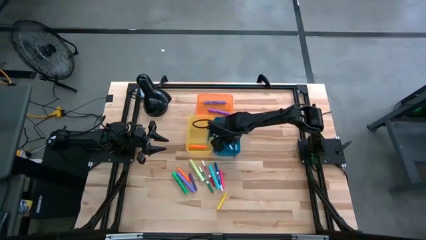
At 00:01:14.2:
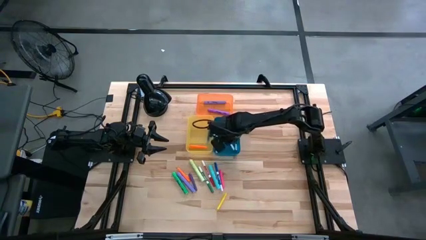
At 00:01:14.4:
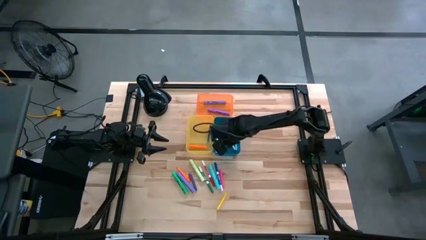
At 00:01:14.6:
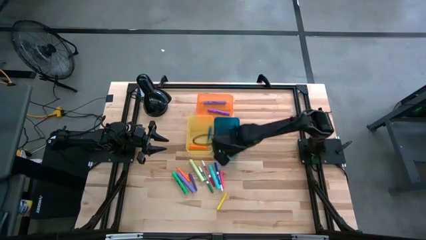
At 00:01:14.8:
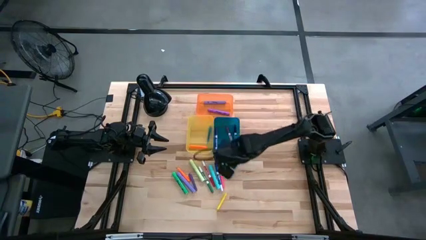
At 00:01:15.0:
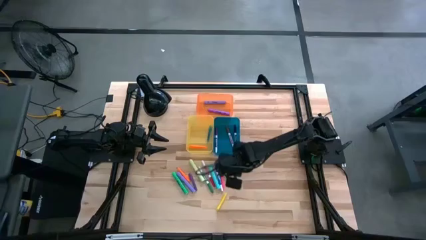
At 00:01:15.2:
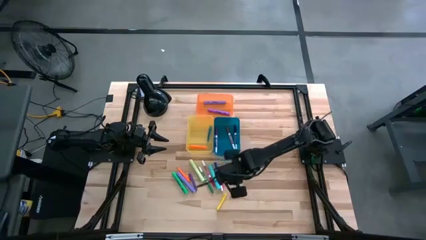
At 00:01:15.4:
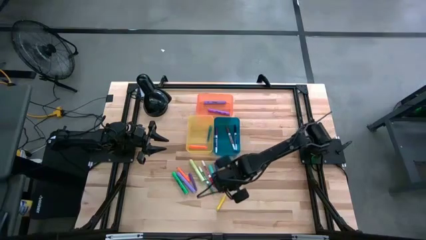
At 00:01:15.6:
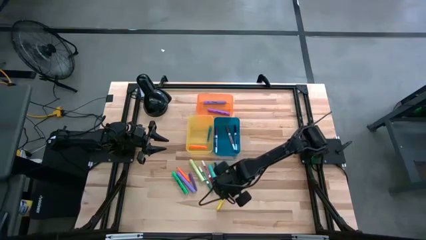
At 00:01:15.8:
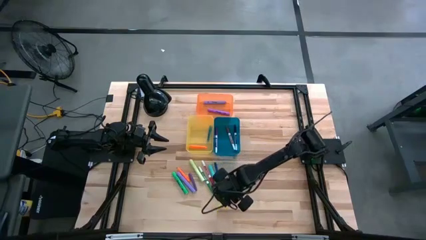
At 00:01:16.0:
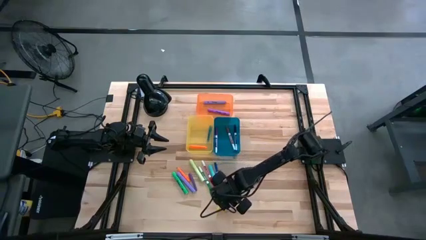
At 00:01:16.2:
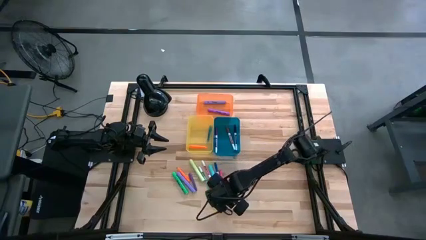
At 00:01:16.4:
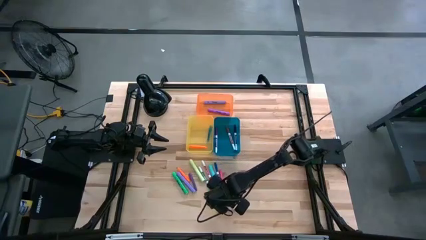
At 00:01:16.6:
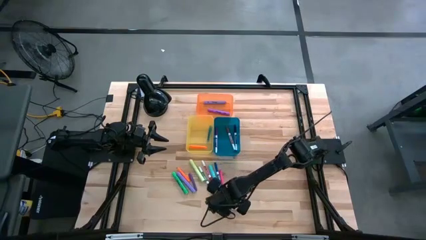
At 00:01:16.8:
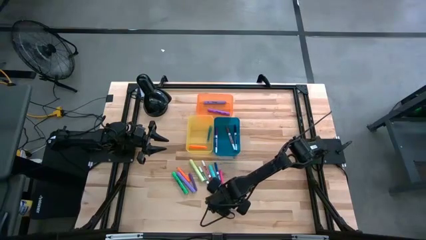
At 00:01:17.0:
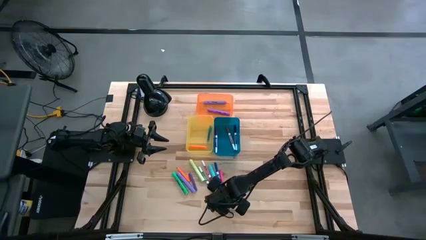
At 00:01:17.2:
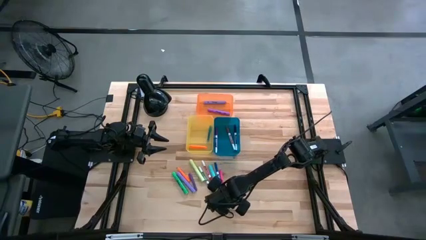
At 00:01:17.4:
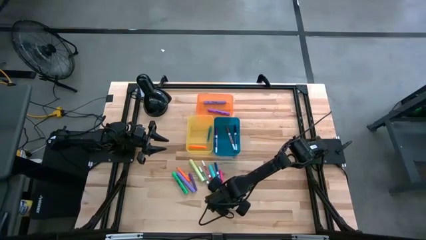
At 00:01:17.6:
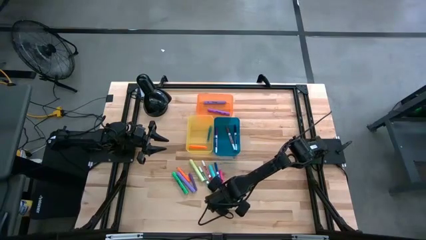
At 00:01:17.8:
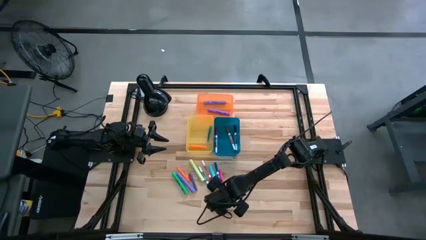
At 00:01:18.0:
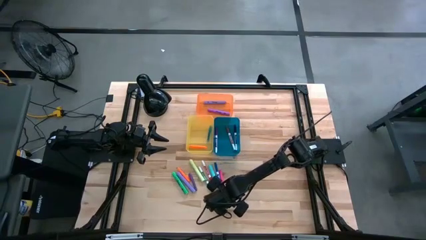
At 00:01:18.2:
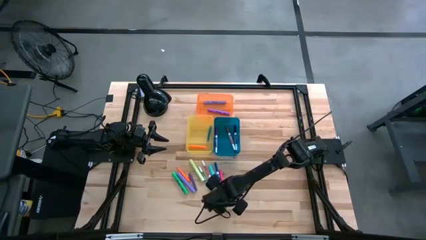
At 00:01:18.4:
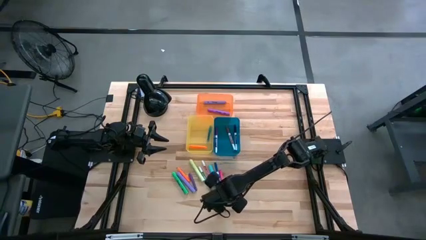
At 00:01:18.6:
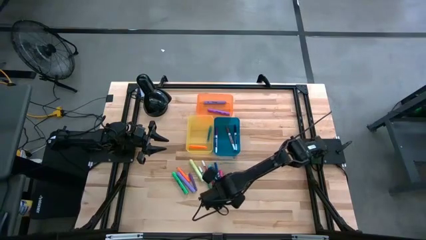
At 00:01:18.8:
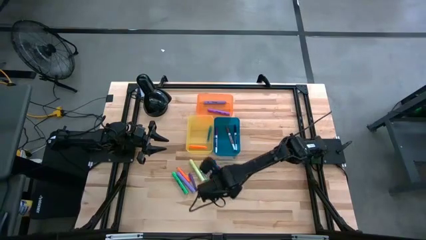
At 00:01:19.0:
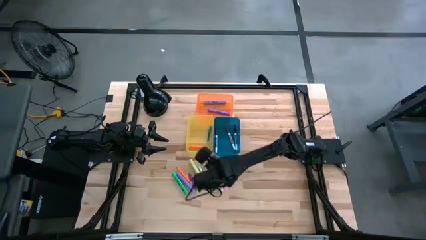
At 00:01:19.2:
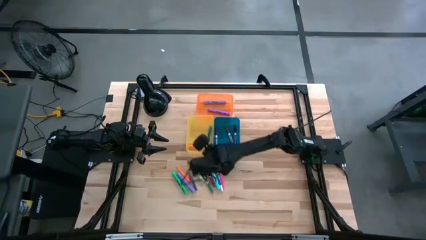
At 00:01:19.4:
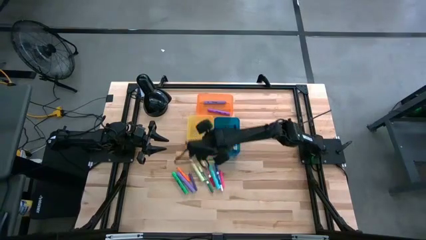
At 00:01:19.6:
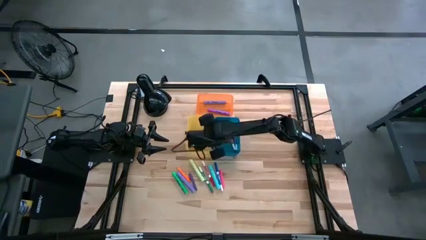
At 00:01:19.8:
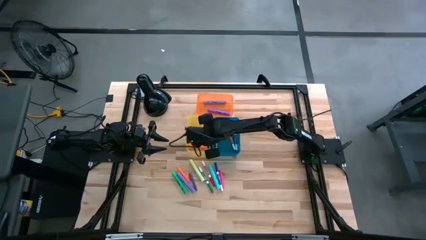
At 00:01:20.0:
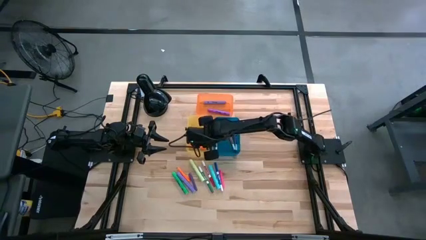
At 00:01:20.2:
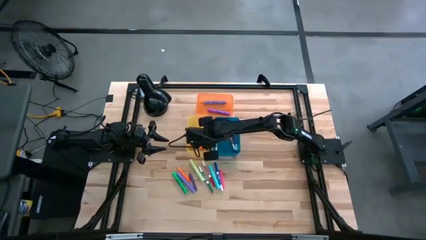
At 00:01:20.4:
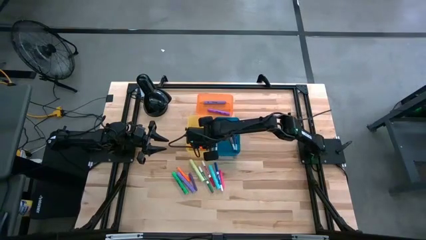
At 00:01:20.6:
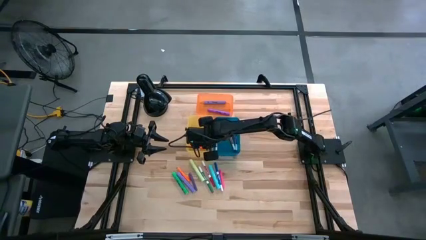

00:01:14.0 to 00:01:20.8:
Task: Pick & Place Markers
Put the yellow pen into the yellow bin

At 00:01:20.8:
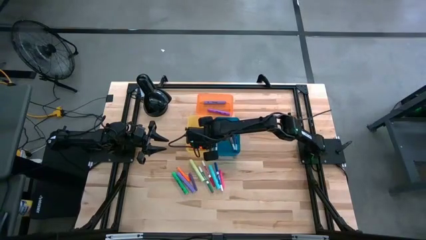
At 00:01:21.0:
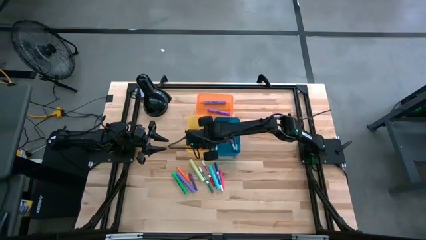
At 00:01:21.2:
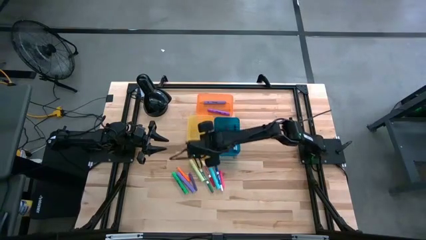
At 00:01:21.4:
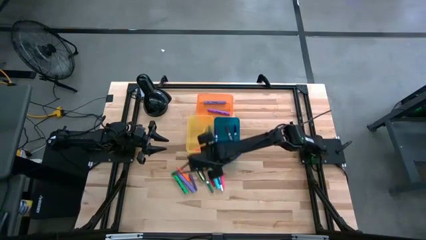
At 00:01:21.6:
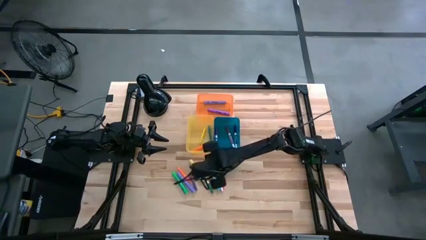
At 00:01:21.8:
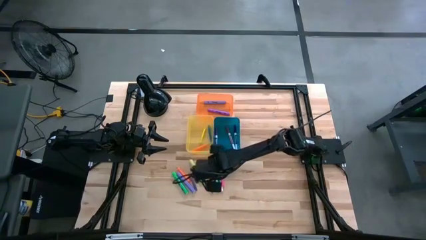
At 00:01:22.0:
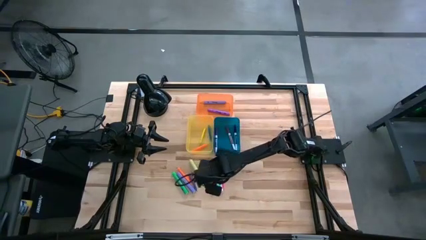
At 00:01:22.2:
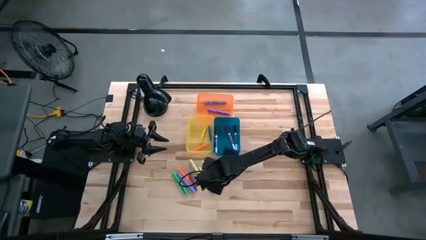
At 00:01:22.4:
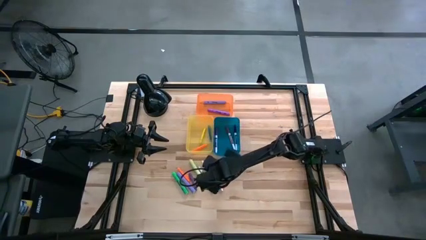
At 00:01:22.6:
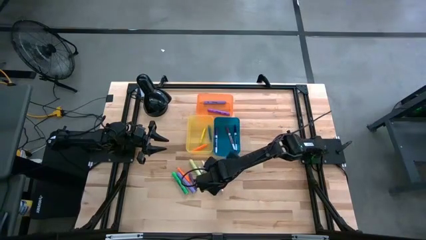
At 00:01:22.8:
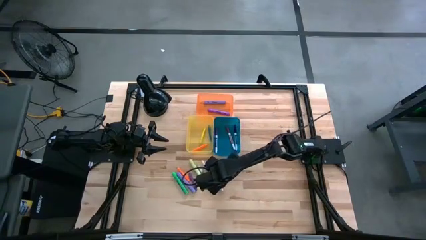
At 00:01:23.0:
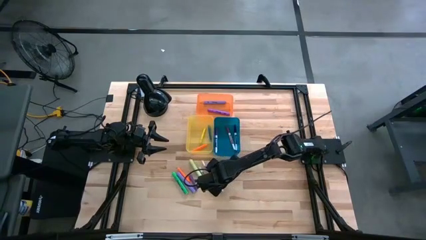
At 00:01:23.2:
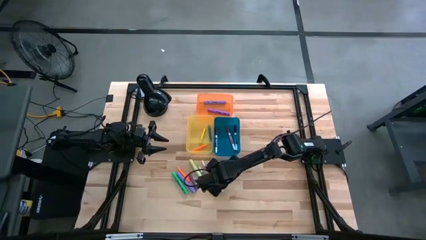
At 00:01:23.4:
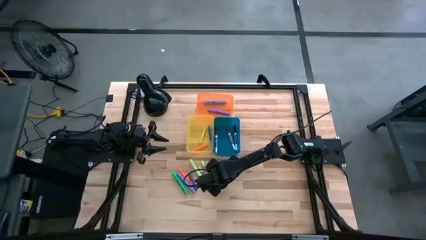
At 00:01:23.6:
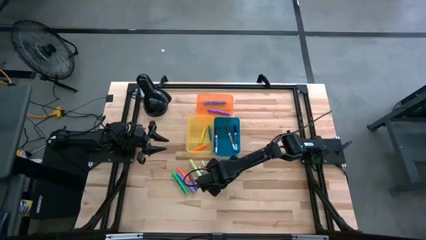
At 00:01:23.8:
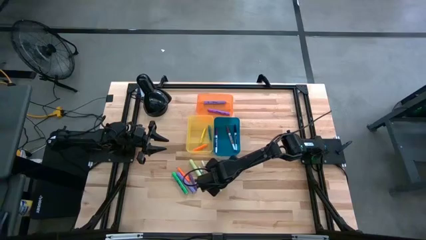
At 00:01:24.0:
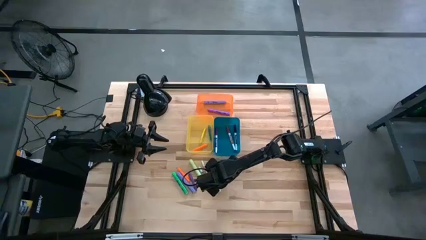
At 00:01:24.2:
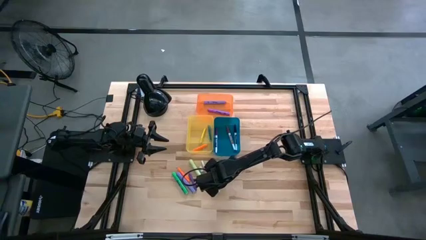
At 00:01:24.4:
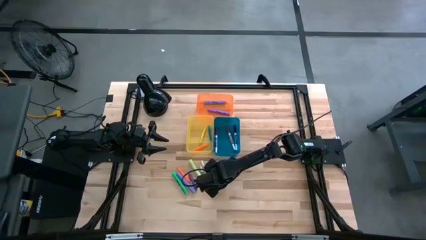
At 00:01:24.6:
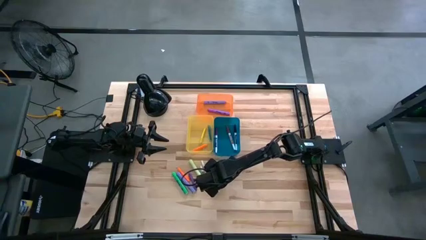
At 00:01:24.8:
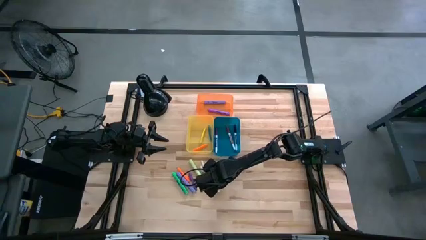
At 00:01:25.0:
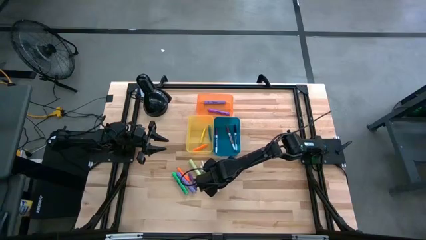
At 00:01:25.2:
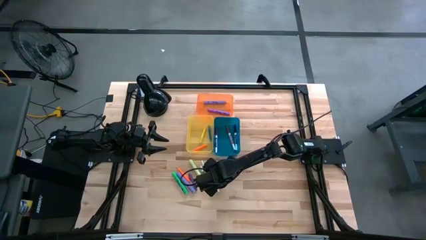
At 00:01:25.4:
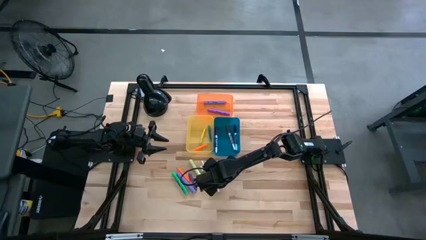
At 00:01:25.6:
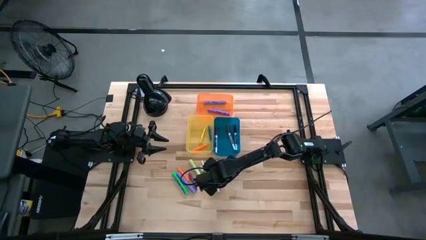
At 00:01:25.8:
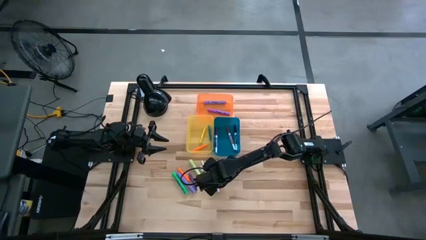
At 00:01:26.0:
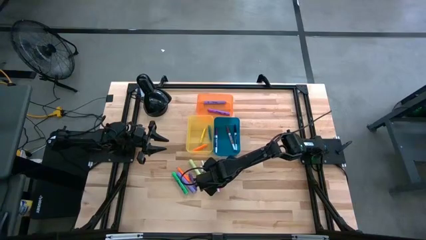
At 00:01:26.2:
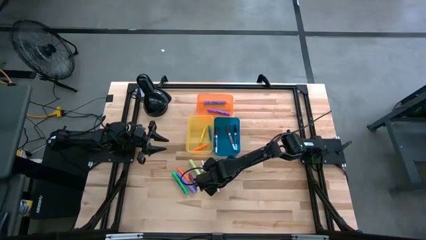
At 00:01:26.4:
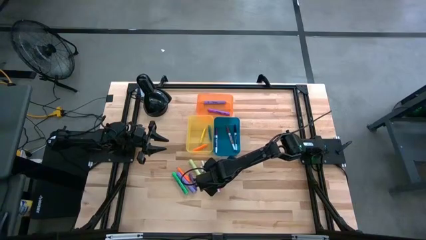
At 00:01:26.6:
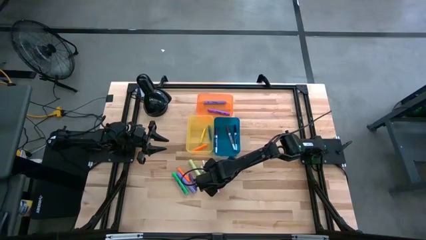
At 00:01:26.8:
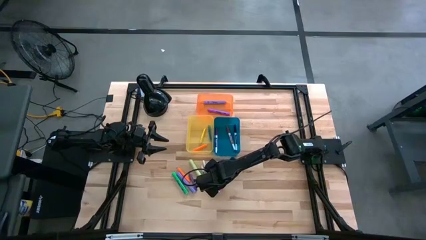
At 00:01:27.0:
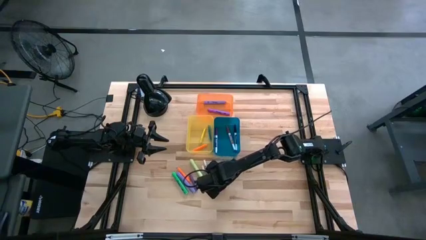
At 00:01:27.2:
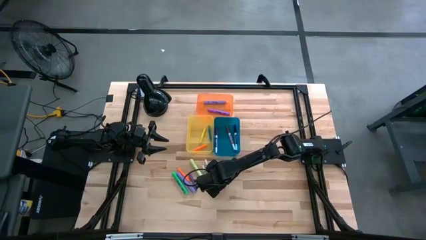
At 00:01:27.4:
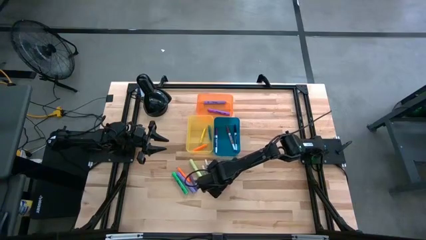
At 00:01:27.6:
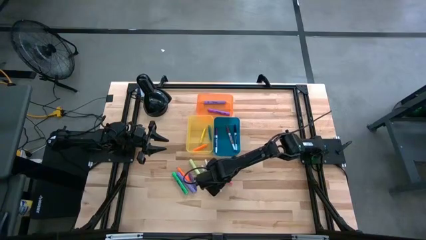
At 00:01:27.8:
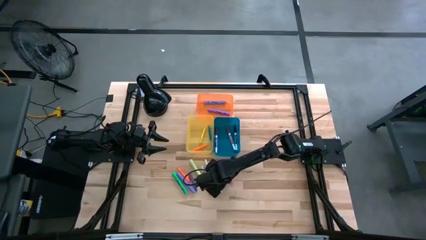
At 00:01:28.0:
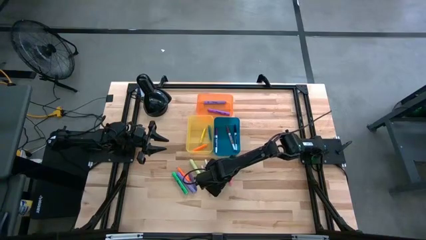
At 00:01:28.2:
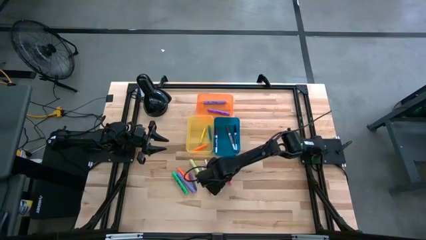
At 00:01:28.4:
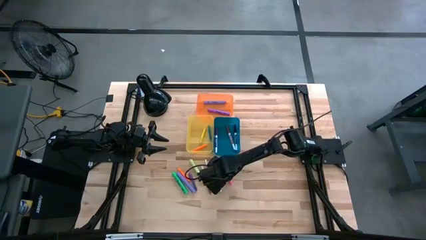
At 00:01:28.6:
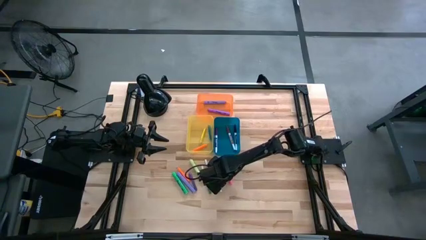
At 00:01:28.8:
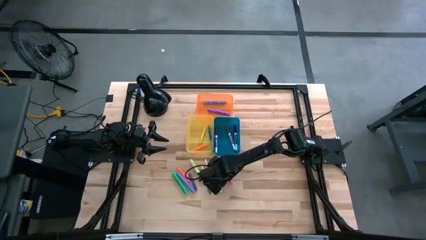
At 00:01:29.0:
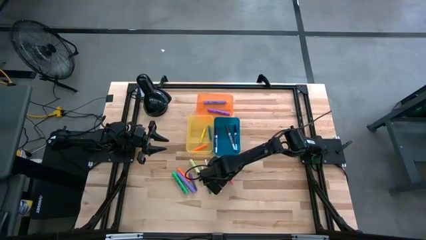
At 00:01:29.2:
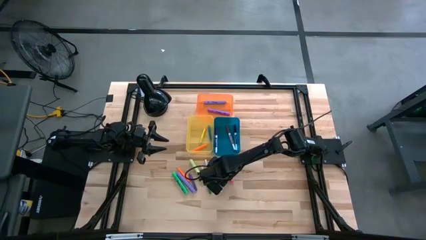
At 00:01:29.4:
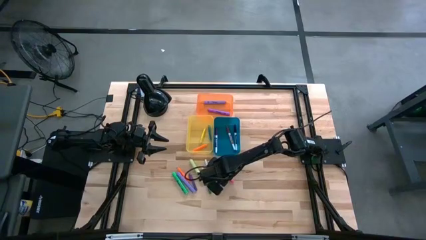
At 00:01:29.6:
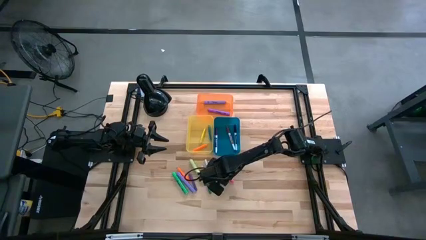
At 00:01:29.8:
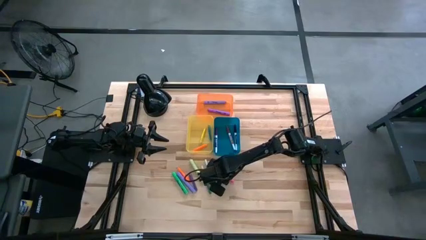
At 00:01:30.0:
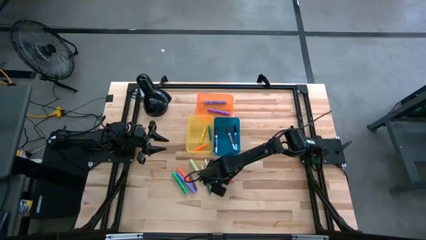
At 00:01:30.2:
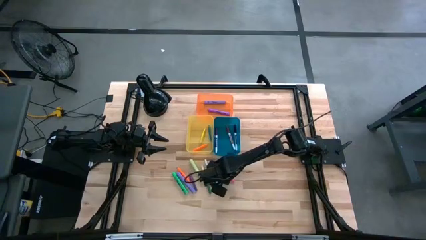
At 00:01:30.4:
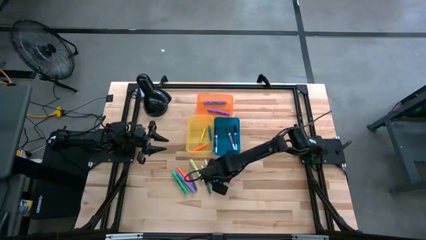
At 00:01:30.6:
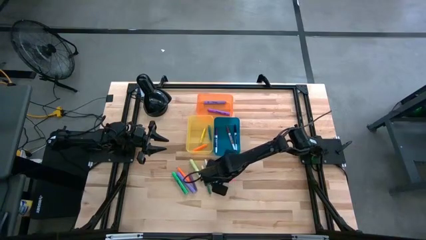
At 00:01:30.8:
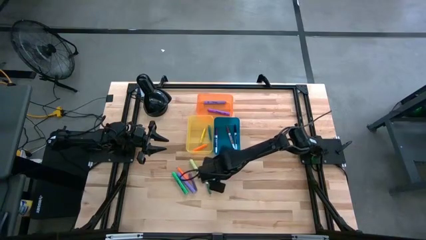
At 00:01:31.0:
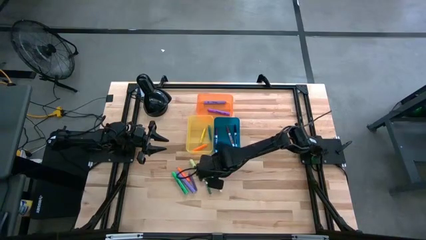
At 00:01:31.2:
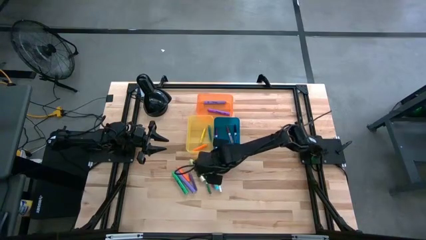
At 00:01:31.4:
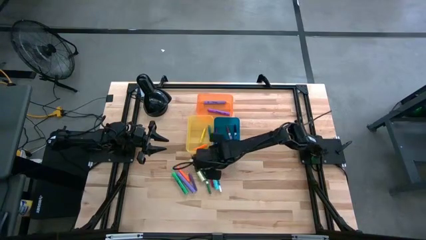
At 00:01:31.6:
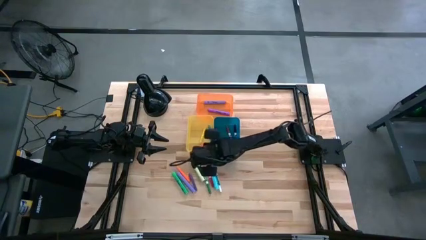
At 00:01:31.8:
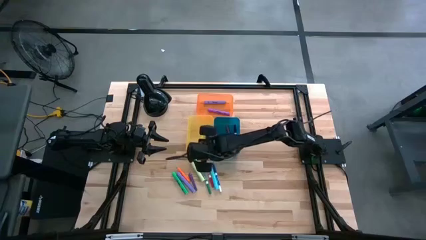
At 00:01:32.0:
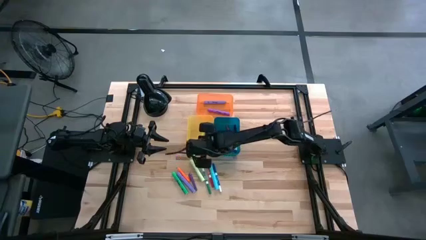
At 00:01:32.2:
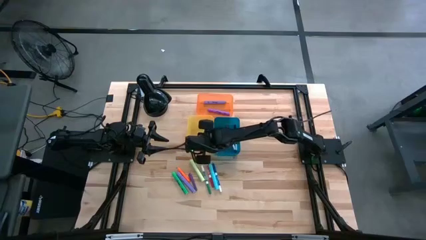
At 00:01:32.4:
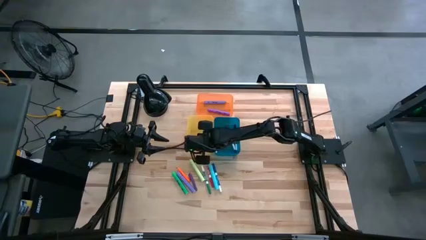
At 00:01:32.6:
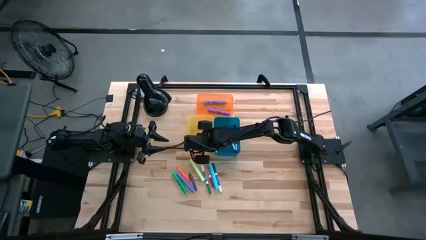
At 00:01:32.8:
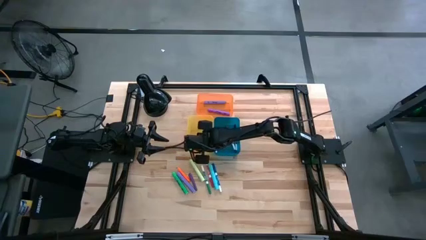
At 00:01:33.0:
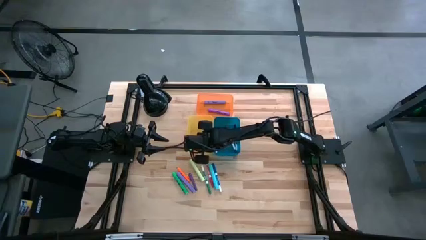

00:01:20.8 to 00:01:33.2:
Put the pink pen into the yellow bin
